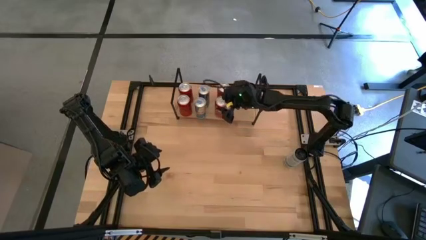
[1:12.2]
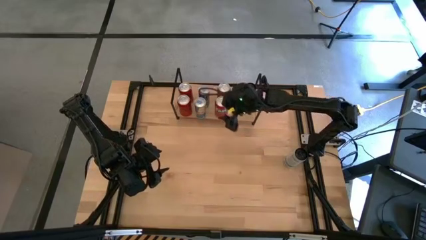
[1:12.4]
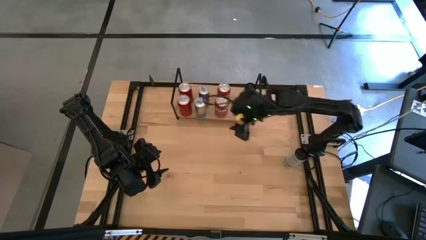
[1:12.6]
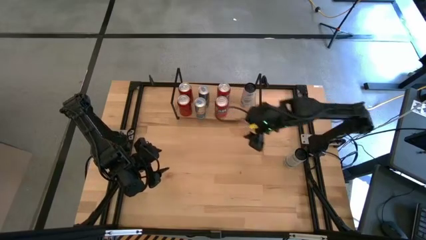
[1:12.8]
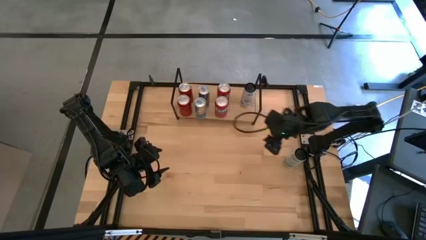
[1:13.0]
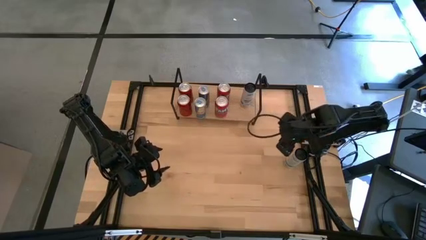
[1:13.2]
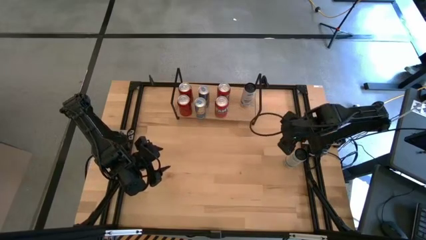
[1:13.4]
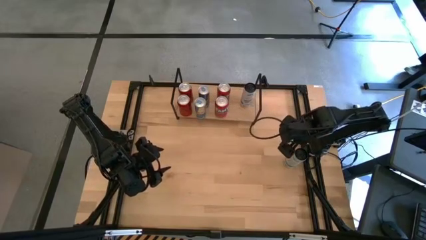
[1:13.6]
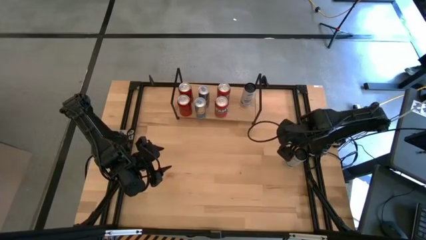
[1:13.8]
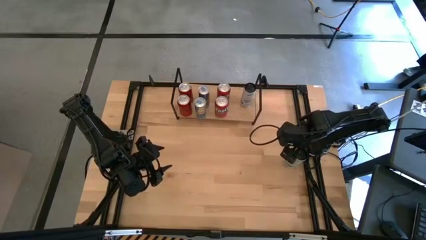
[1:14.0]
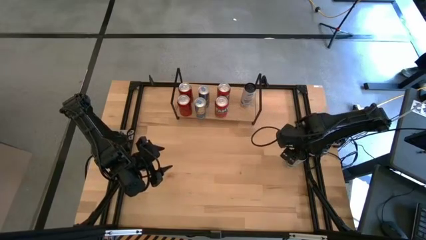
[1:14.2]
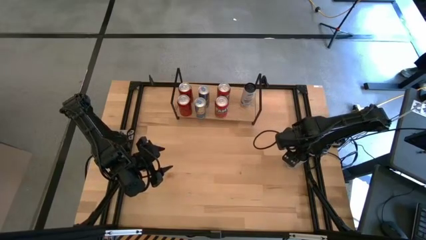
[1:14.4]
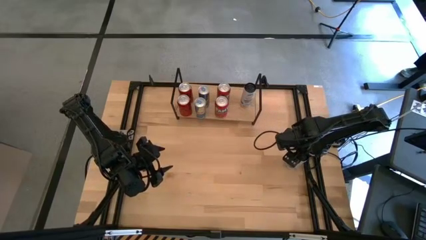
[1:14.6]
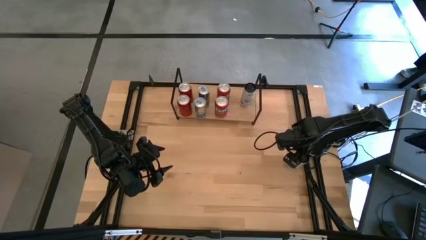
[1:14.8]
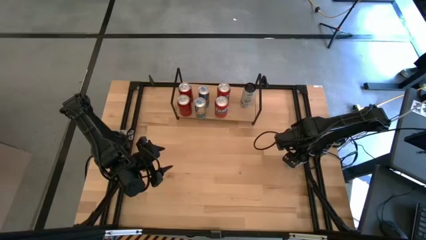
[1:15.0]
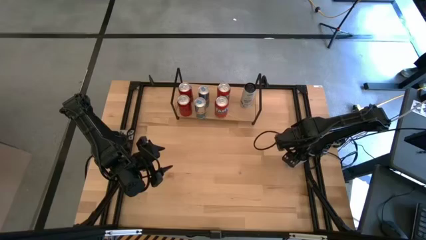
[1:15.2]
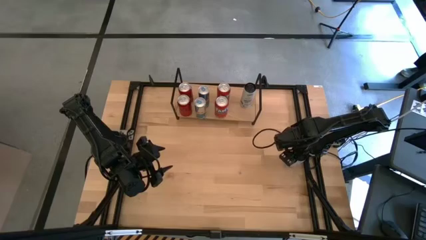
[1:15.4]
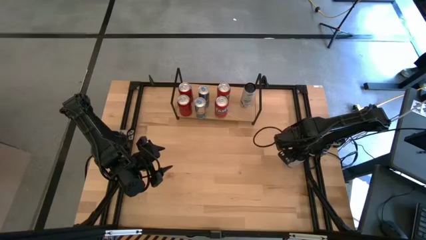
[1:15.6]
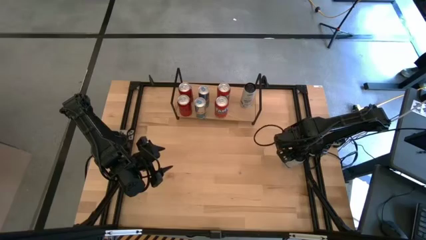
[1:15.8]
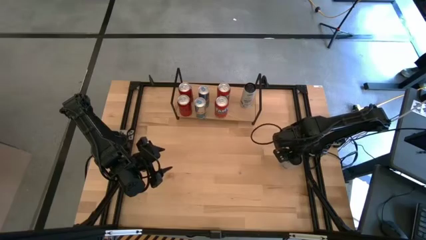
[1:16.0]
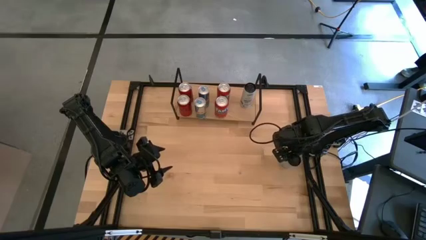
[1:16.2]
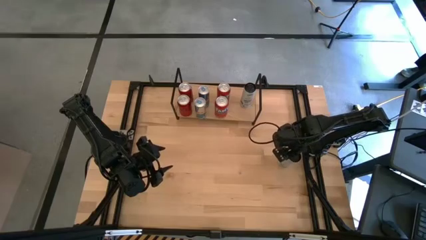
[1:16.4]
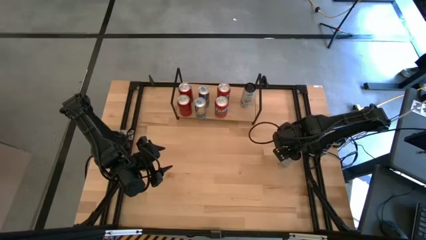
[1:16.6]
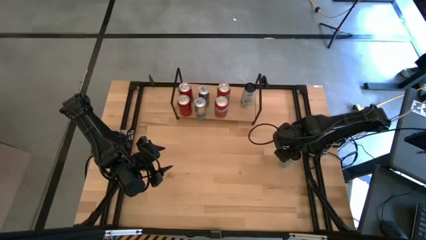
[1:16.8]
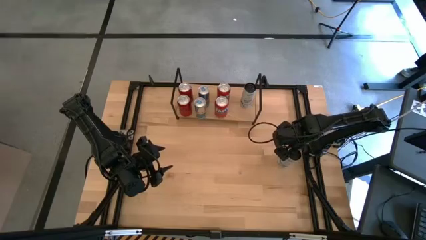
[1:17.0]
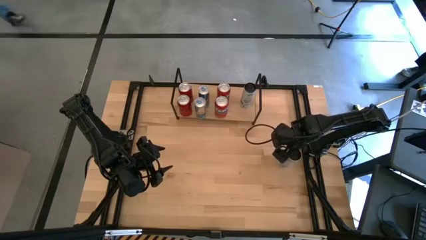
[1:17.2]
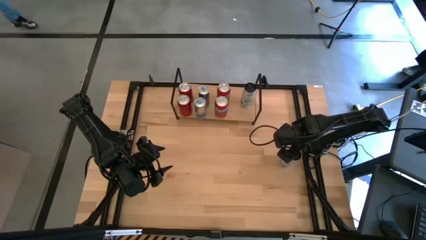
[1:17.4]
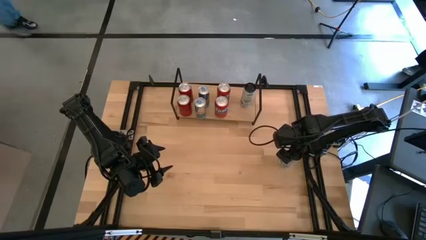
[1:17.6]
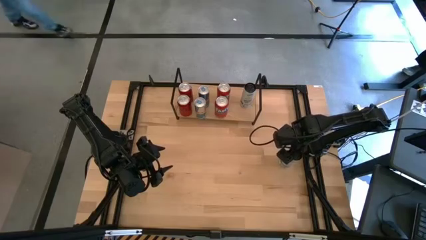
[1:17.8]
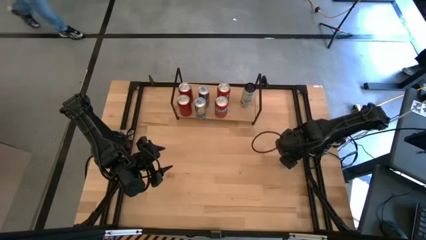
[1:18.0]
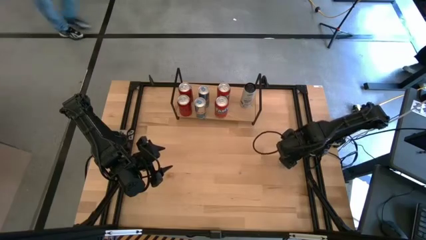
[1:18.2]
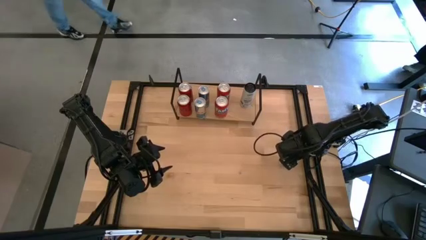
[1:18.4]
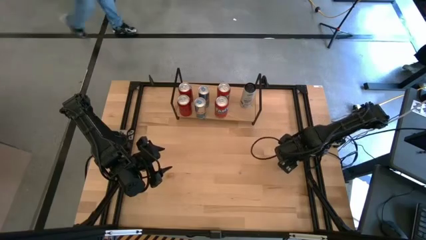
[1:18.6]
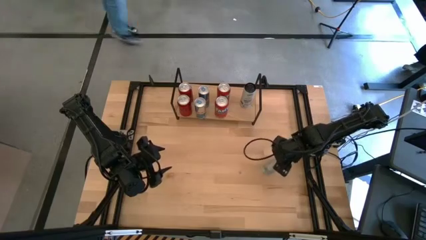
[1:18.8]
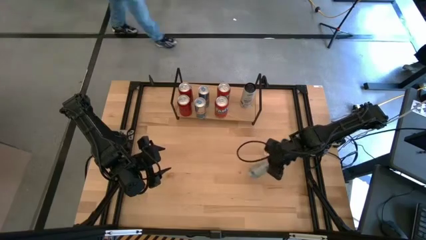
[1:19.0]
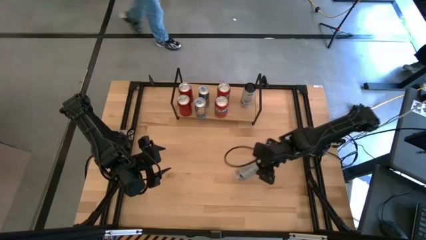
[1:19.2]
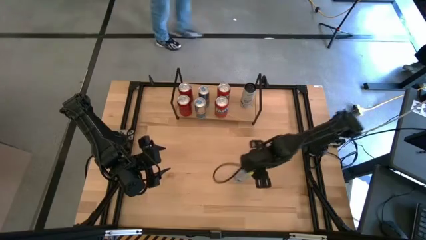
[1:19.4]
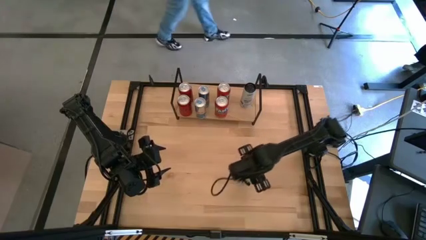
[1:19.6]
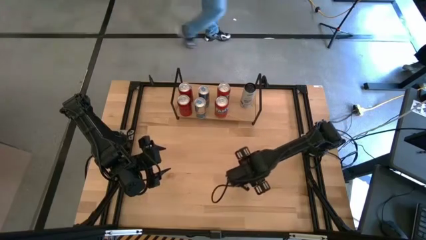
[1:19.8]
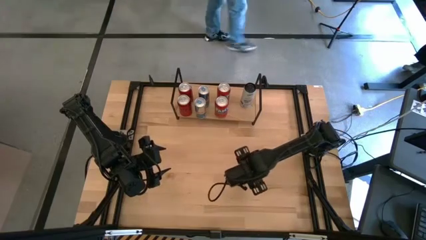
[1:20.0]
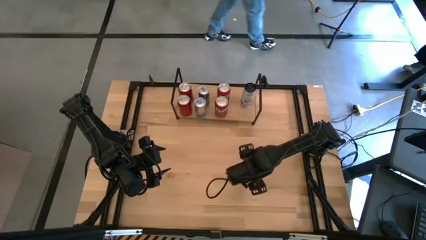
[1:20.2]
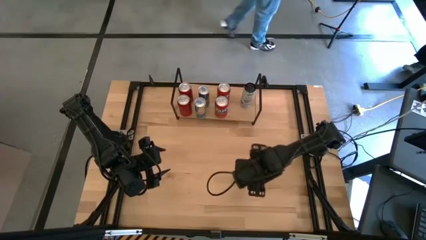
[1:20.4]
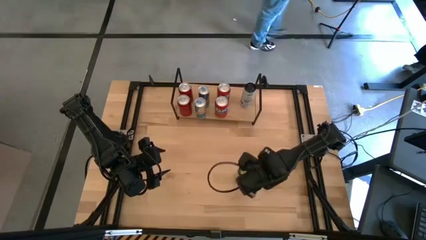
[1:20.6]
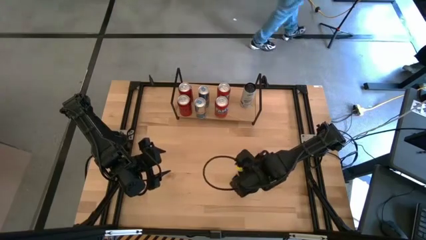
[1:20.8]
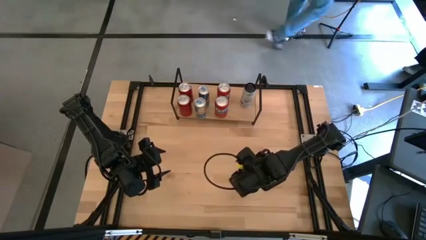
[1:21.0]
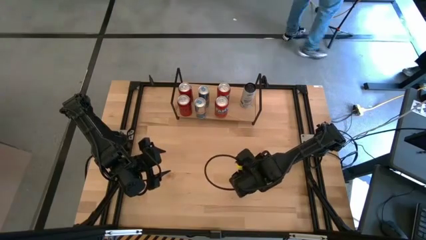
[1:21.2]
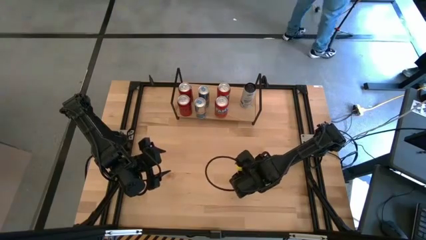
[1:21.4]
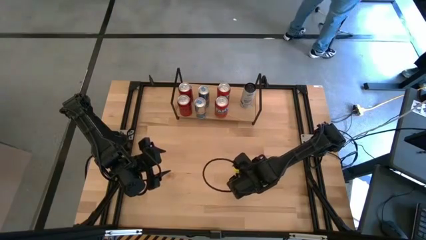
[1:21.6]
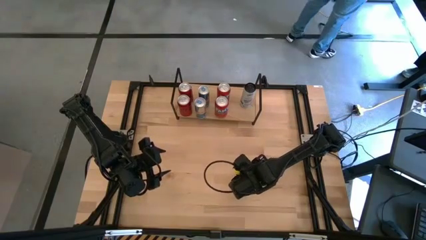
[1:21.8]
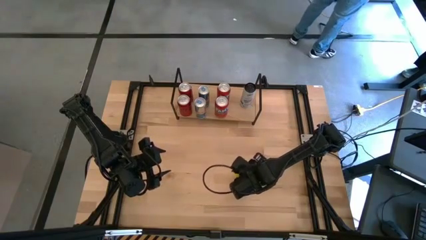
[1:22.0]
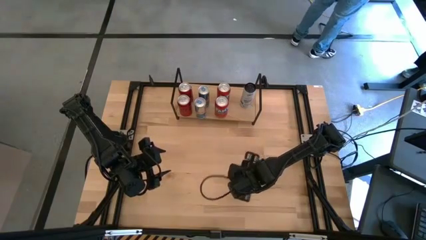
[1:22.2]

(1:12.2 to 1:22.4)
Task: Place canned beverage on shelf
Put the blue white soda can on the shelf aligned with the other blue white soda can

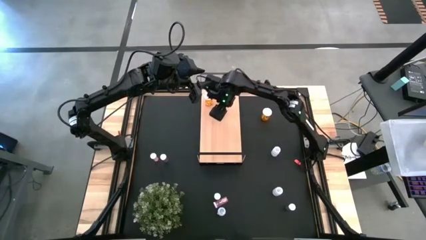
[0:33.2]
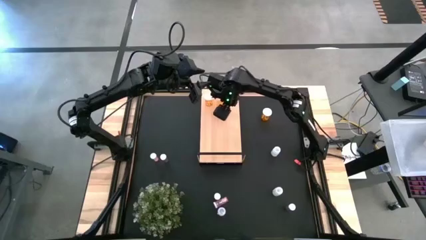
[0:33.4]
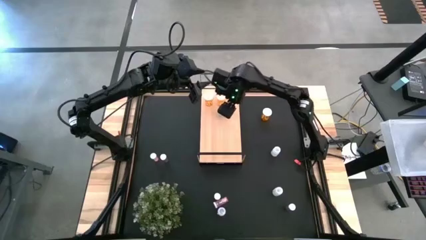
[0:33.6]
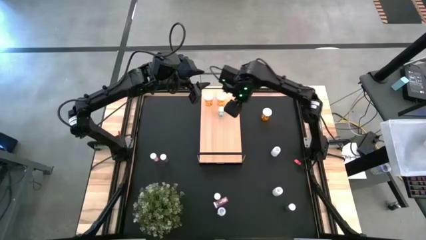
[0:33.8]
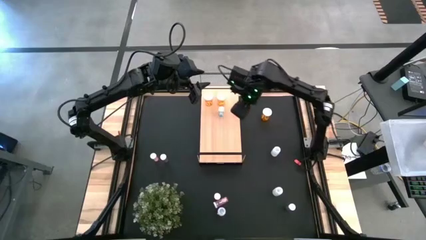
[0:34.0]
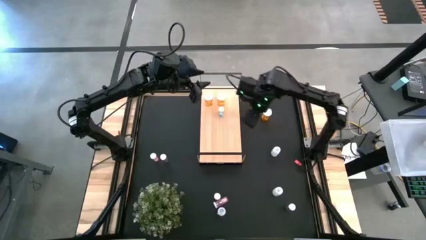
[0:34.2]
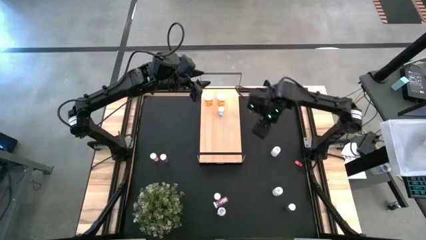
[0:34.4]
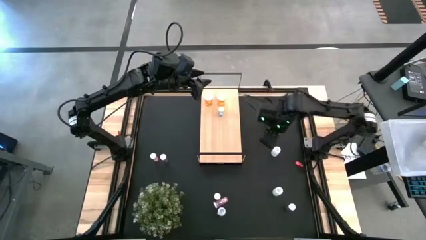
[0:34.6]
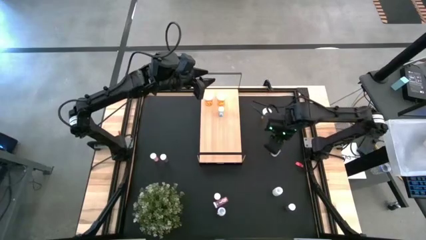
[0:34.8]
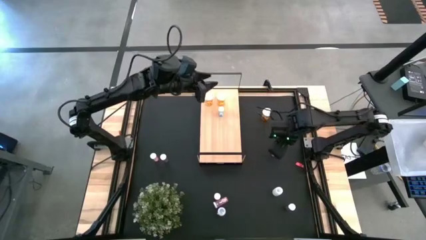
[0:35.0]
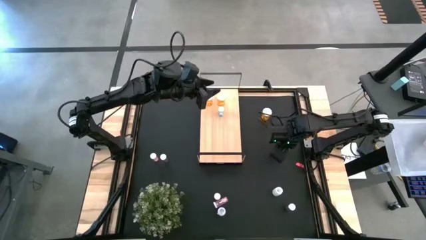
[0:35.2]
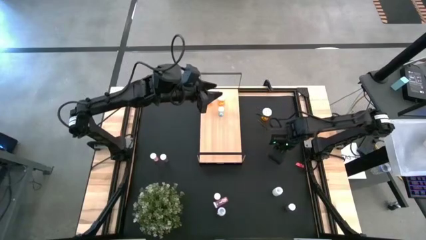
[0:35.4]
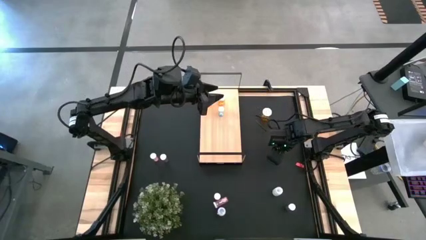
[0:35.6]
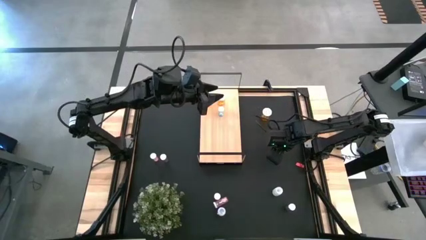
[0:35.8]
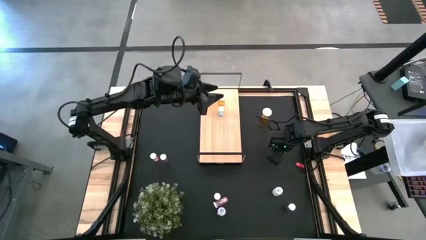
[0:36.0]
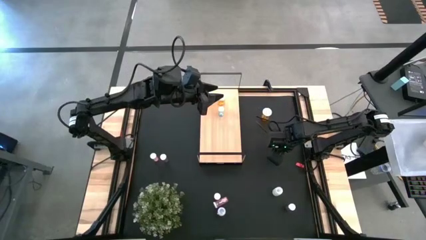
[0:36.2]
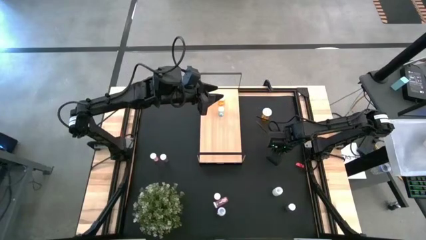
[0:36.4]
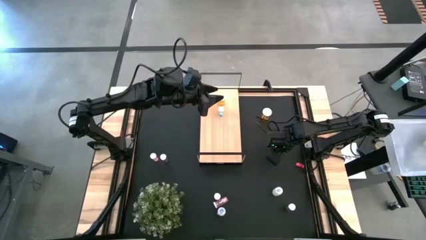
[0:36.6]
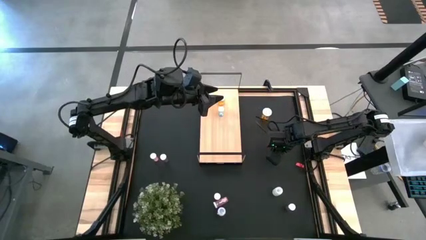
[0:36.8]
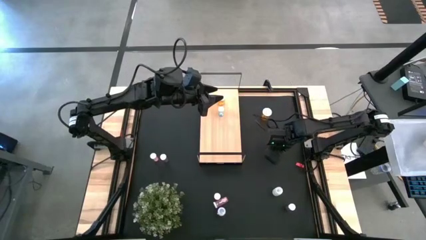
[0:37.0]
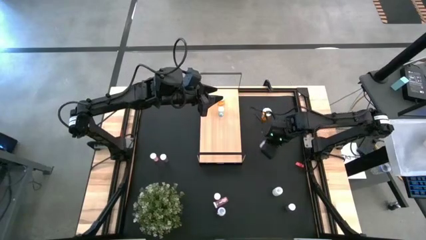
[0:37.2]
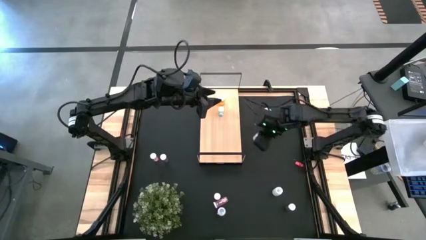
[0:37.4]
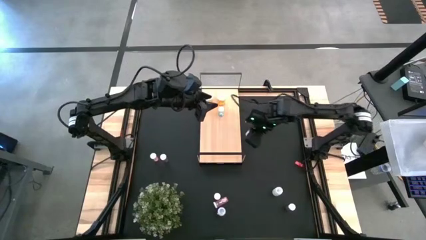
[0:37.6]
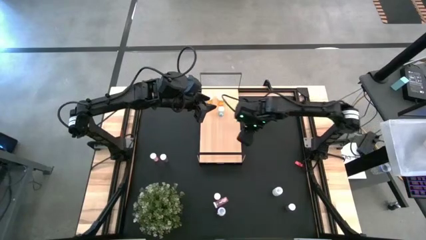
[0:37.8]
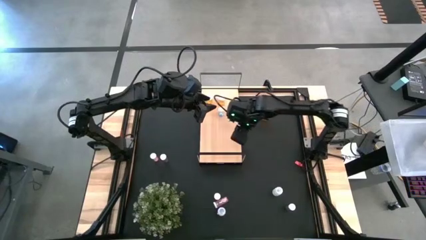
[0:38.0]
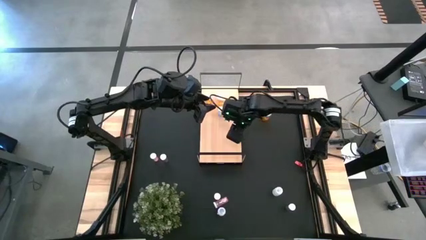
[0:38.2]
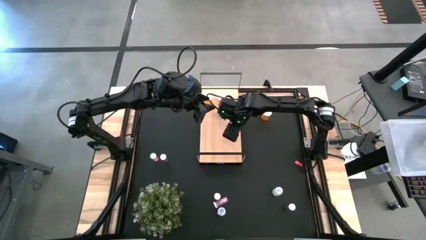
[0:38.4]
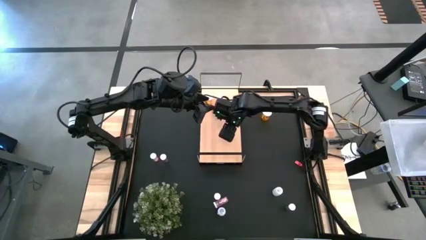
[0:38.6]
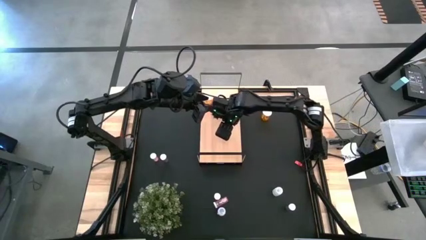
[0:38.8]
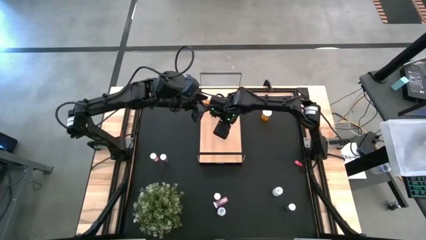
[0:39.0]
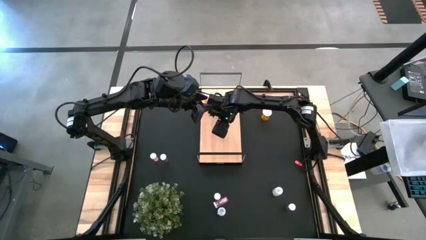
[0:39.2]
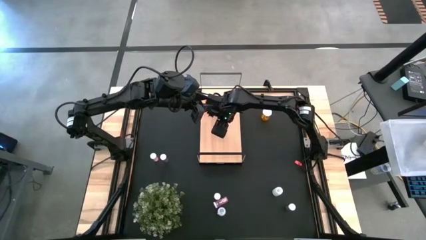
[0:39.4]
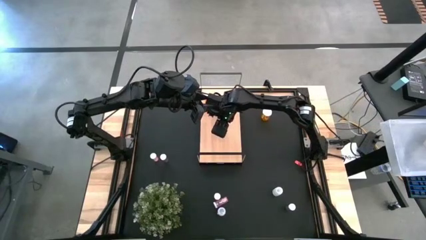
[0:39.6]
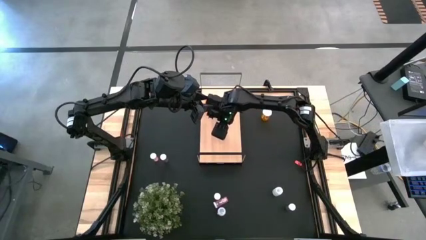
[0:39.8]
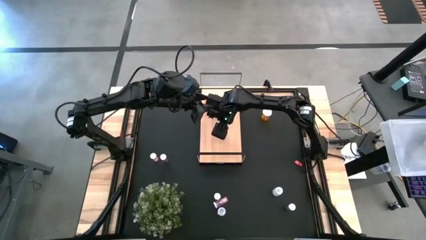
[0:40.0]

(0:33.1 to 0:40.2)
Task: Pick and place medicine bottles onto shelf by color
Put the top white pill bottle on the shelf
